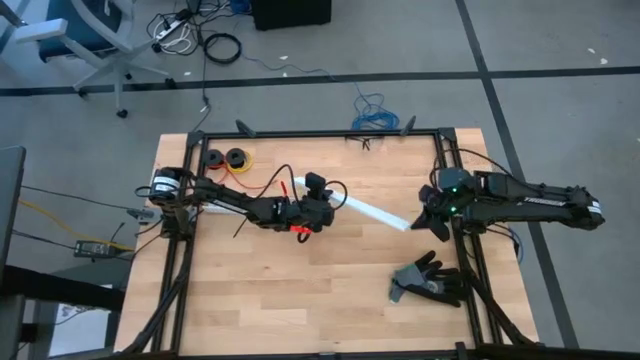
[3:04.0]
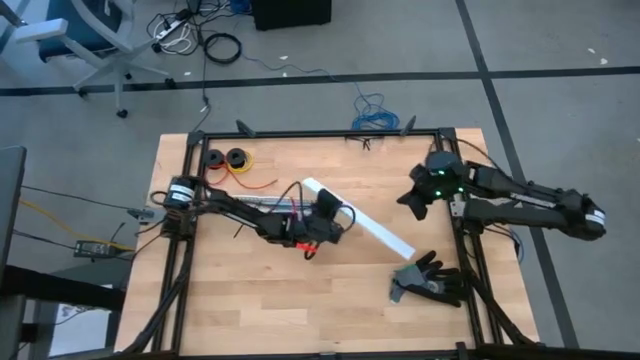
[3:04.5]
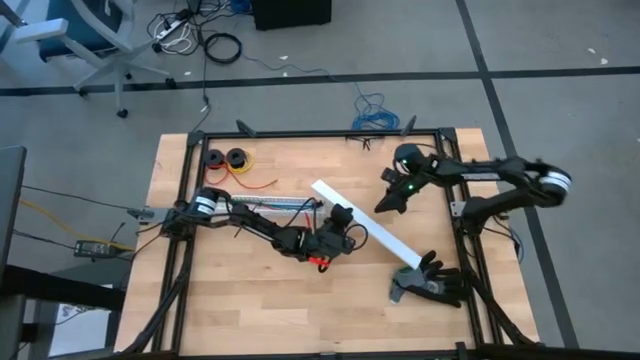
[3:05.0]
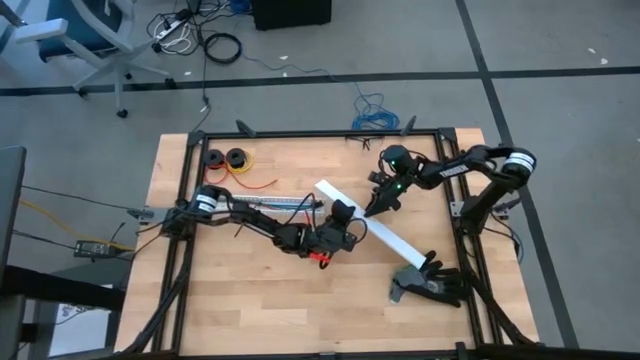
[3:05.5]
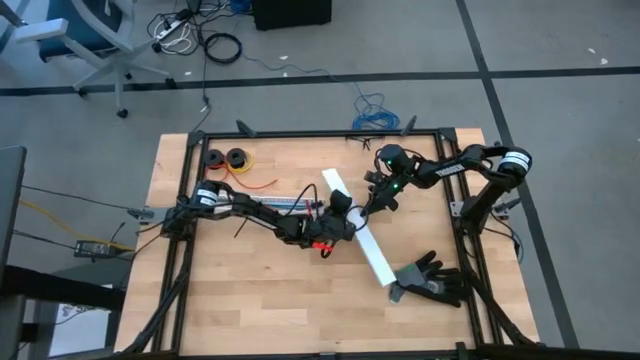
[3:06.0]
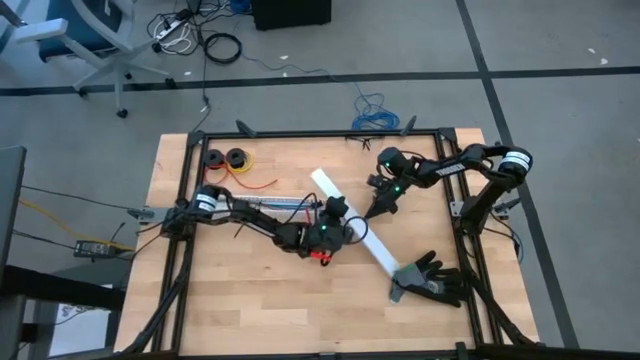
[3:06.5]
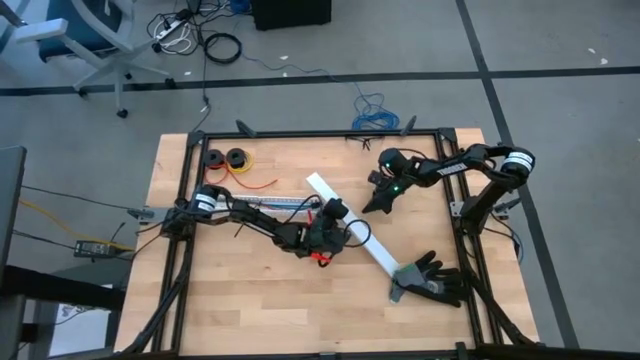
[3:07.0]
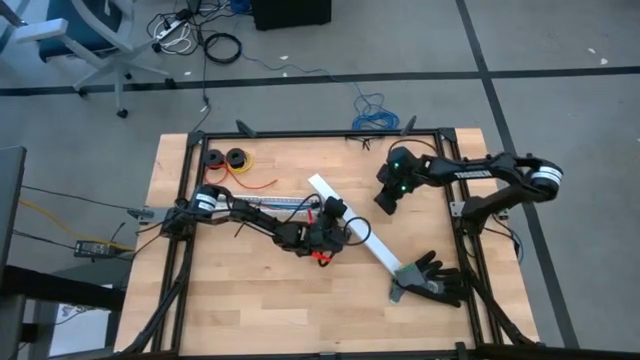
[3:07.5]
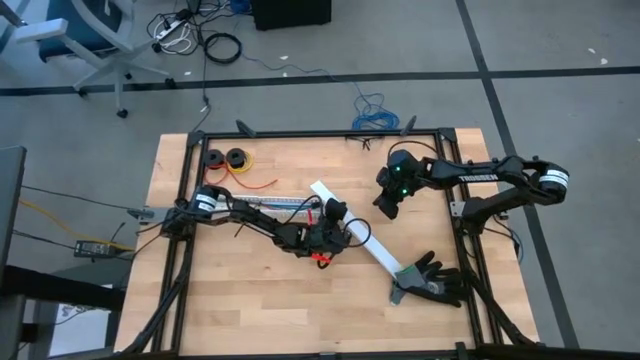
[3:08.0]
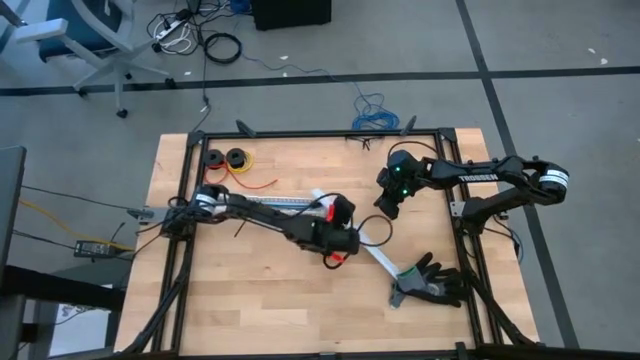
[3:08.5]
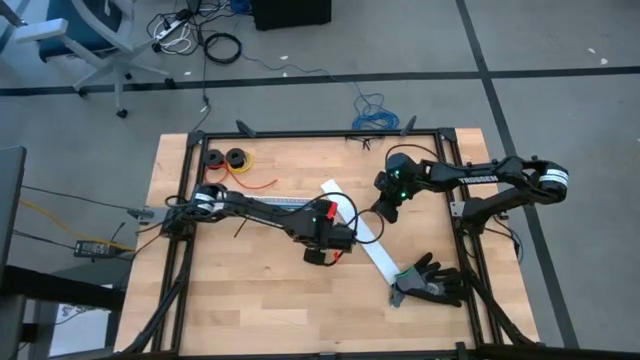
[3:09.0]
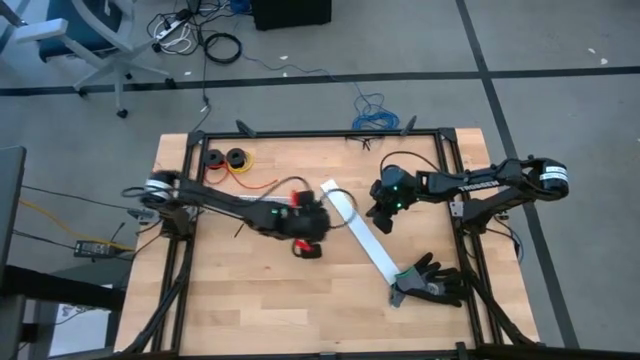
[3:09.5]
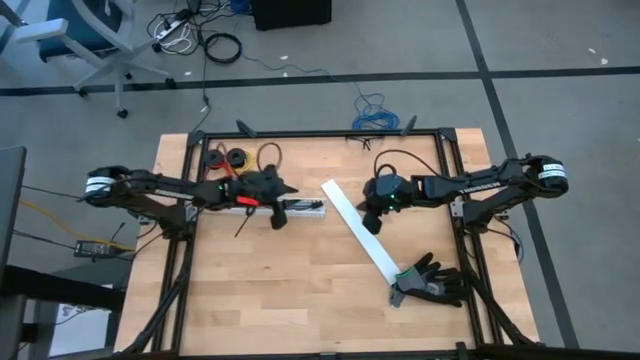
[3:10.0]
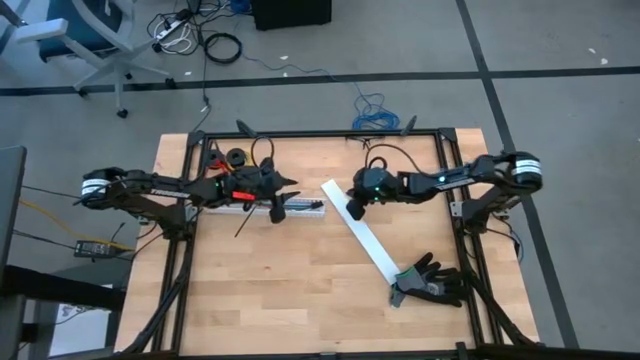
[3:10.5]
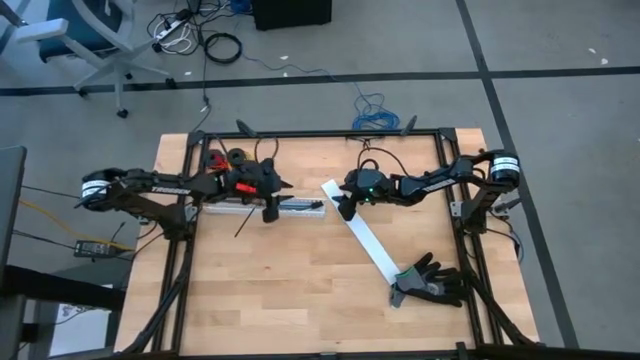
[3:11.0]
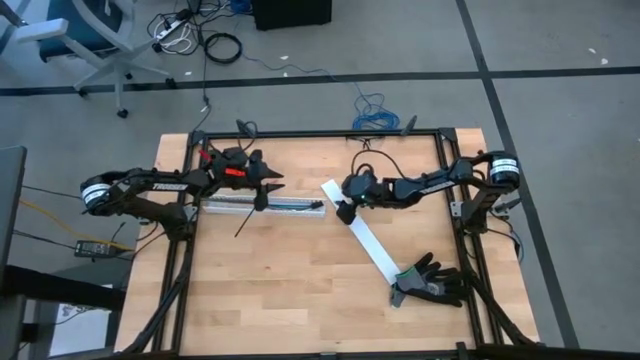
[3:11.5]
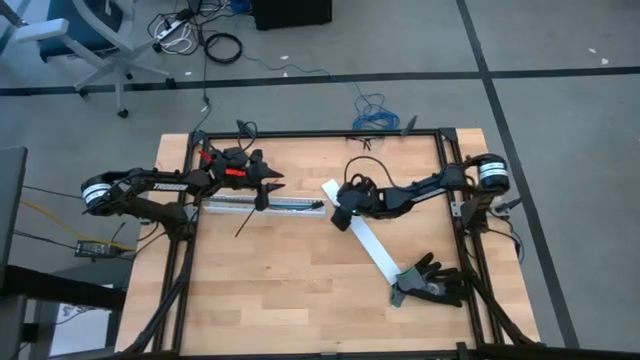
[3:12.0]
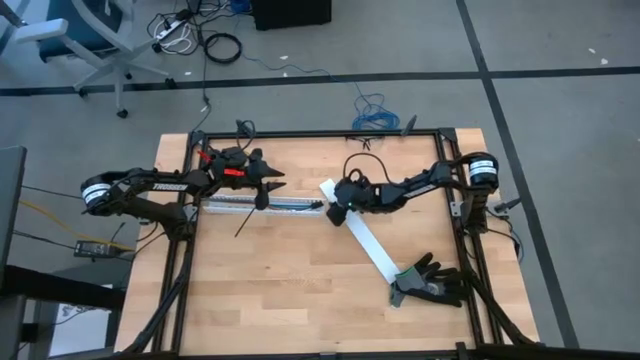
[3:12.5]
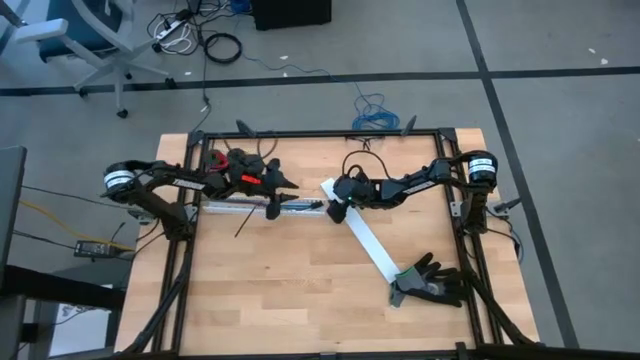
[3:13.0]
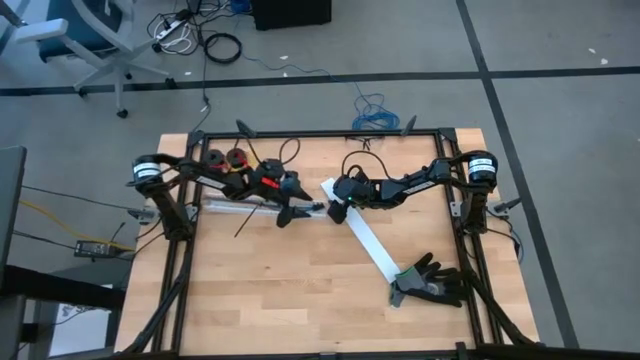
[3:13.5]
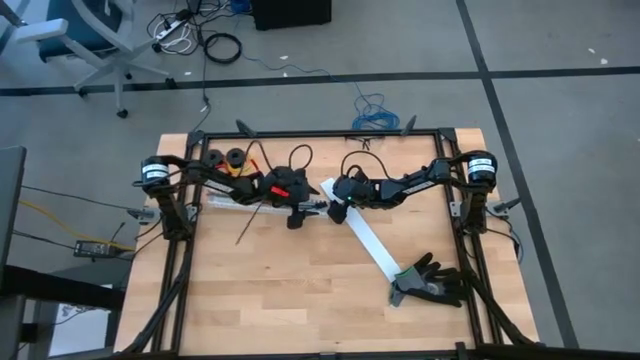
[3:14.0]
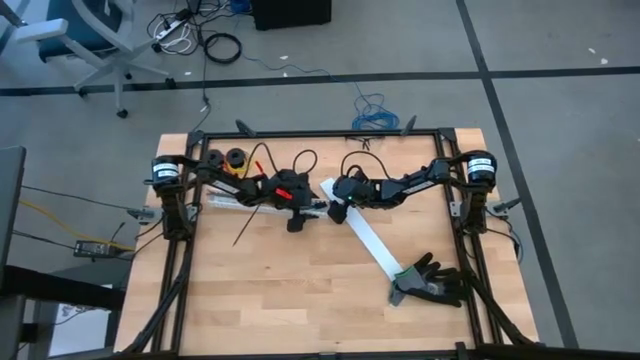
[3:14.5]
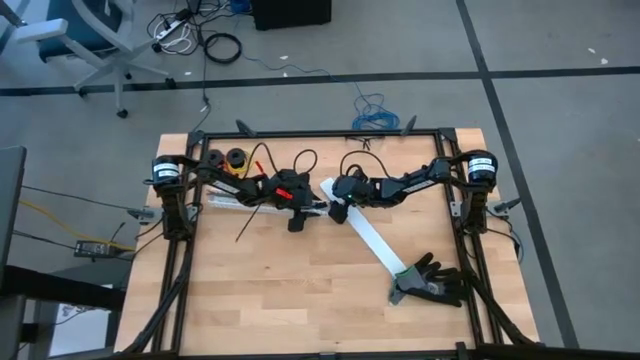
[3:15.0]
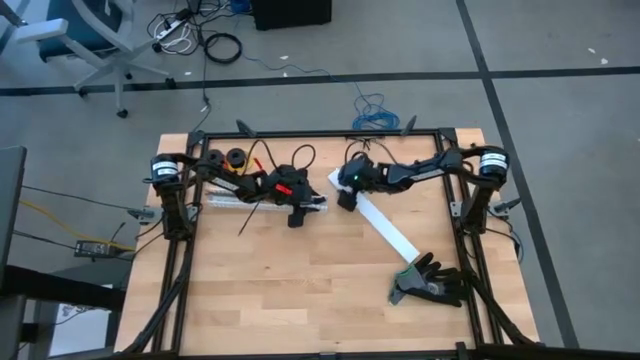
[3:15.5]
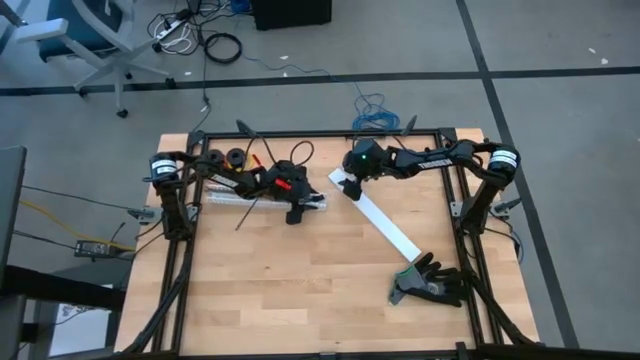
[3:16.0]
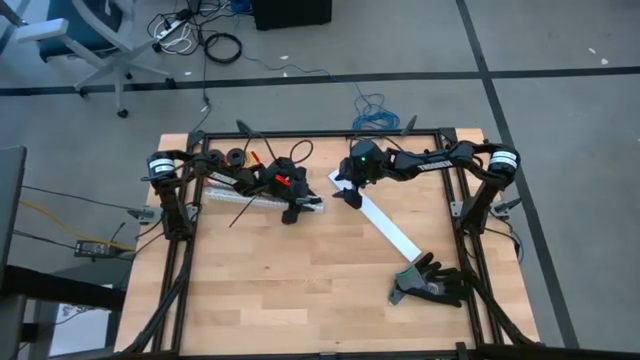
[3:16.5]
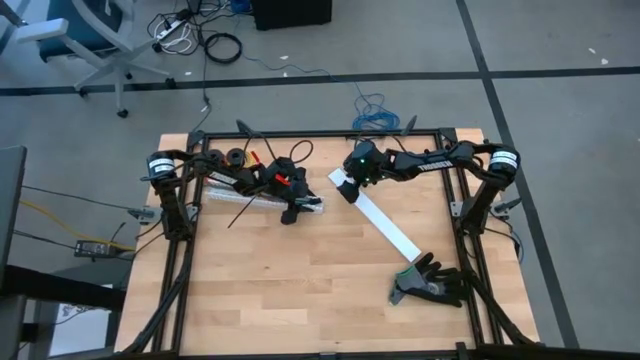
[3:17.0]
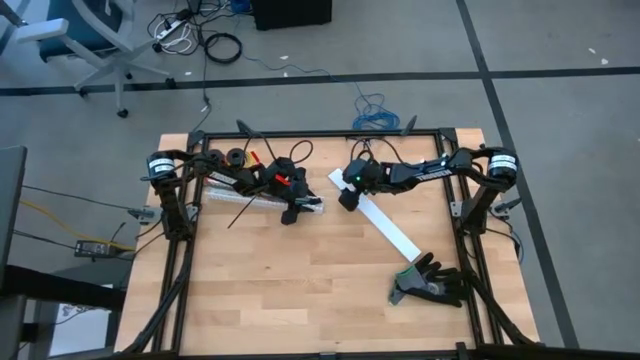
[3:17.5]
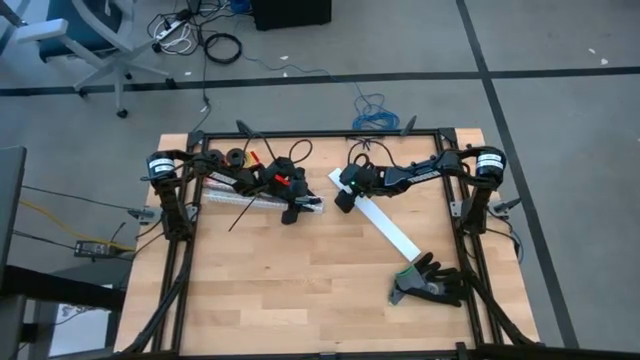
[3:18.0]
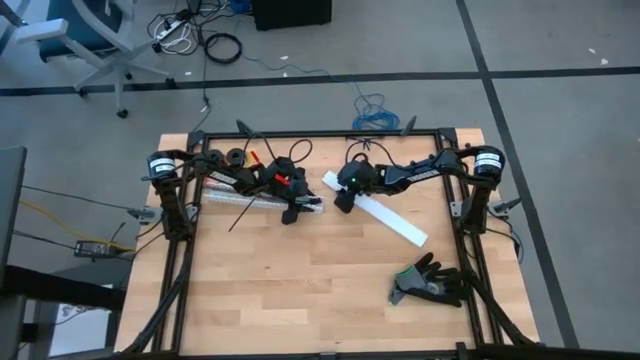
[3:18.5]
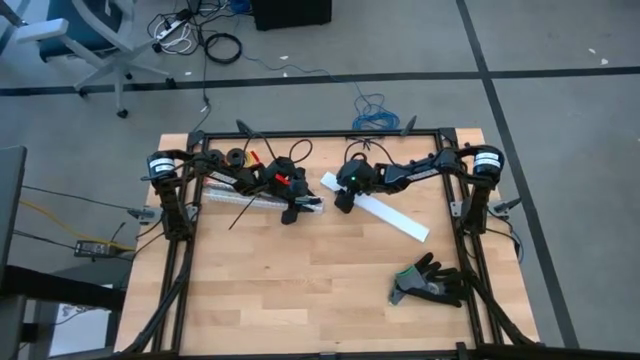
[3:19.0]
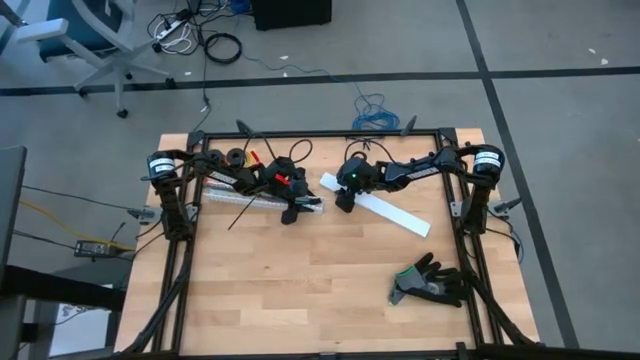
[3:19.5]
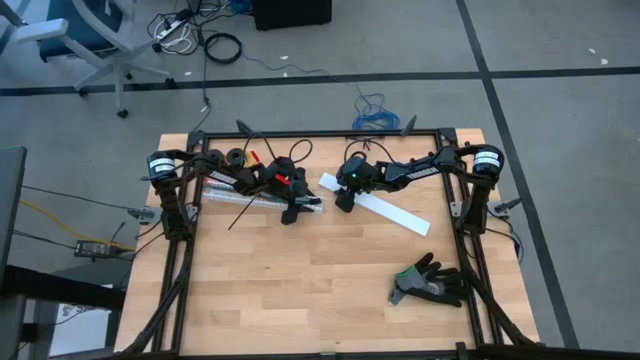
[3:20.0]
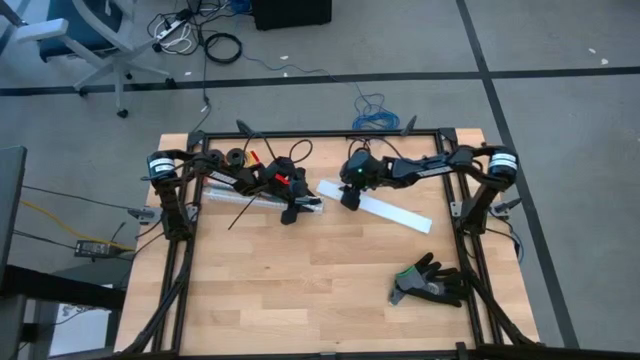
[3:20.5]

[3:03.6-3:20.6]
Task: Ziptie cables
Close the white cable duct

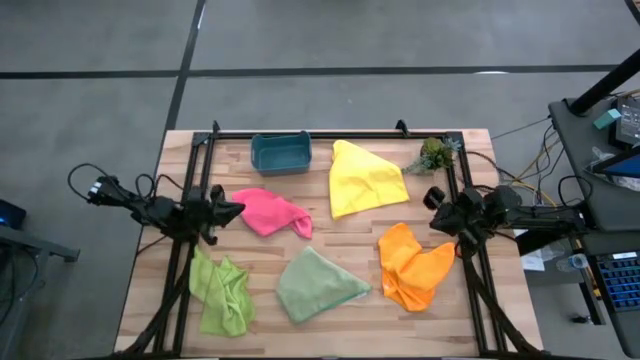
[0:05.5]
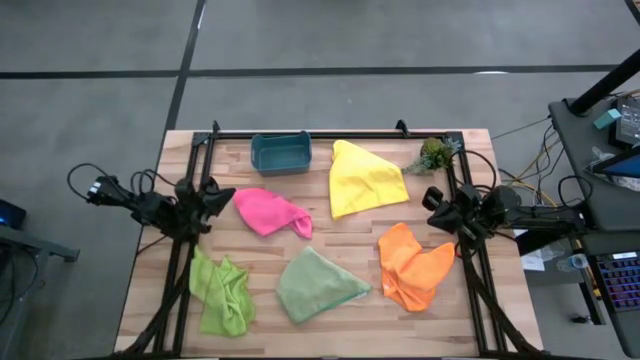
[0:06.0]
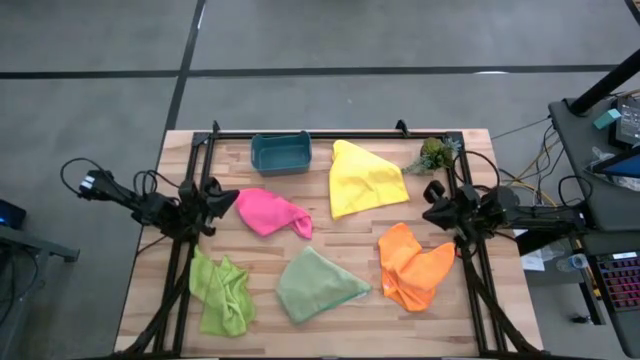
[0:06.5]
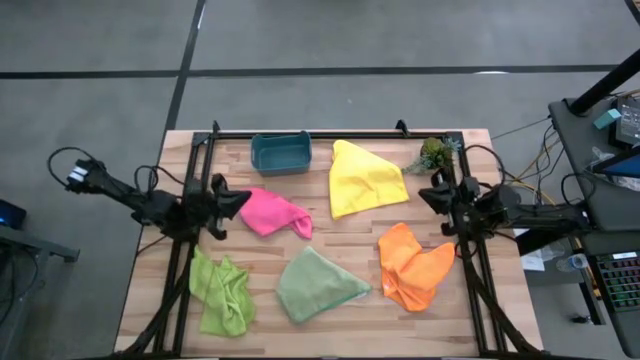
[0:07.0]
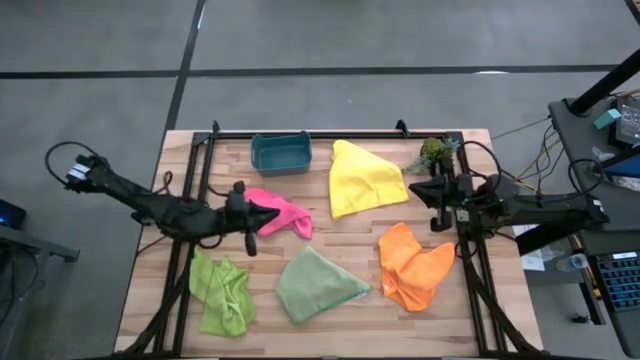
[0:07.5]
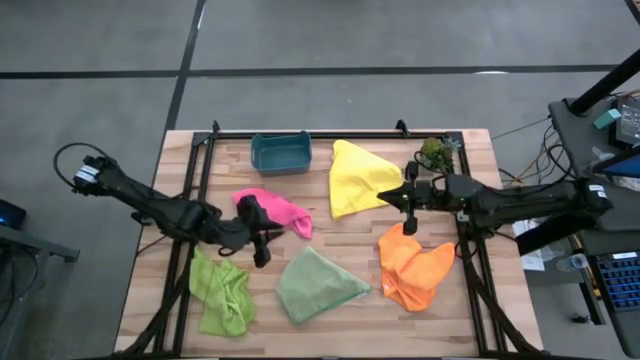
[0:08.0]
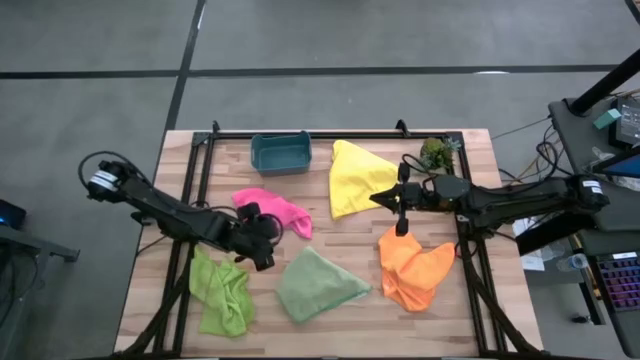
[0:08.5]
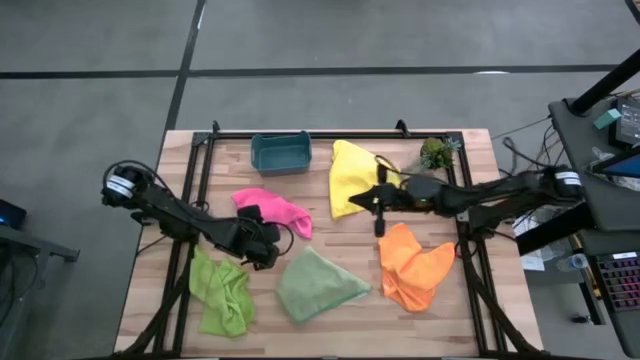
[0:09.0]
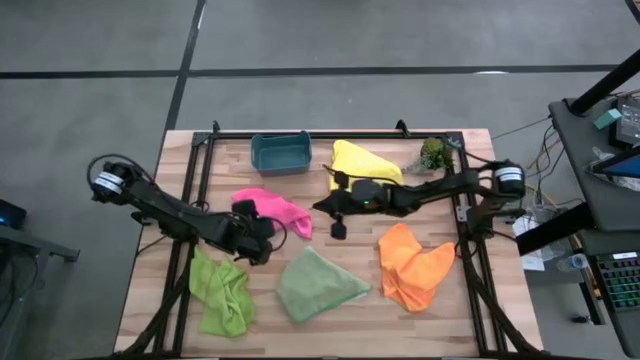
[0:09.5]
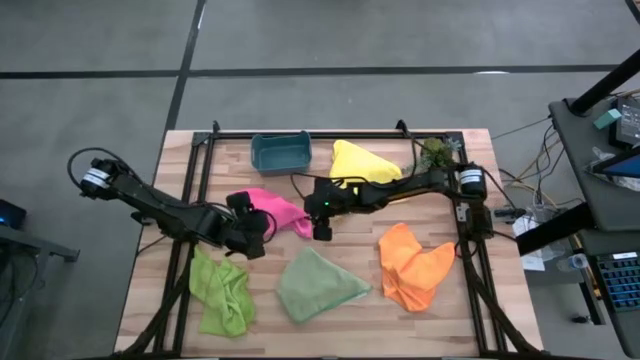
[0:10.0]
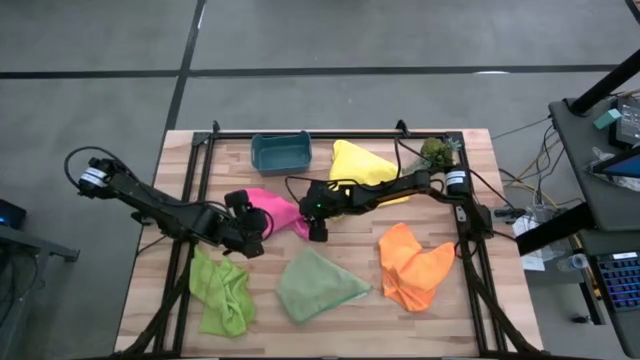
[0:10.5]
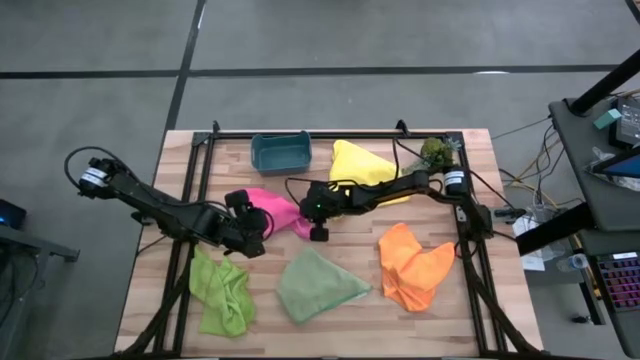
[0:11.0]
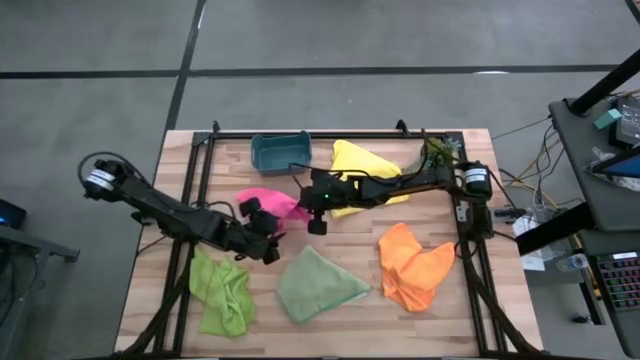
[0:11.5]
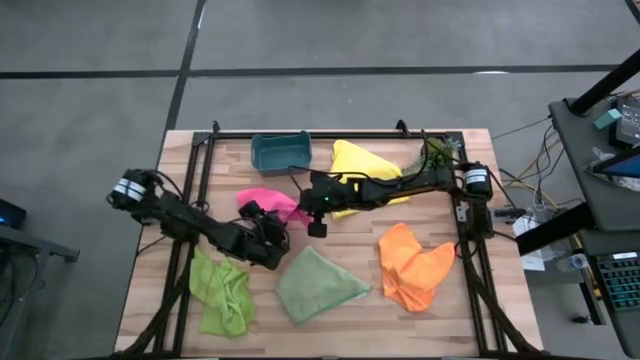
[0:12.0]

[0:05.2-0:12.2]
Task: Fold microfiber towels
Fold the pink microfiber towel
